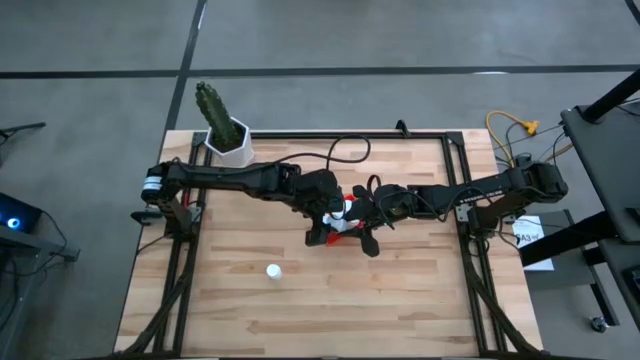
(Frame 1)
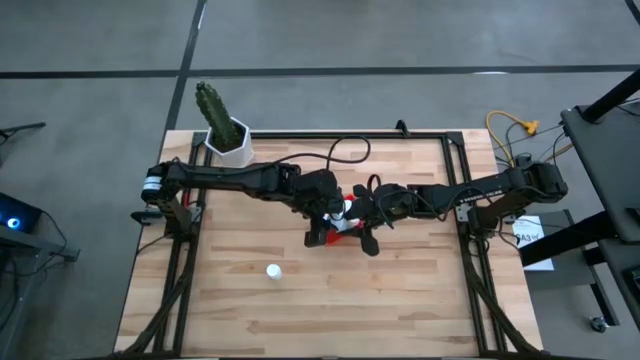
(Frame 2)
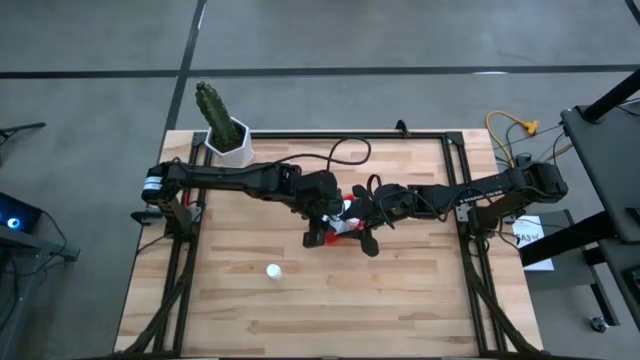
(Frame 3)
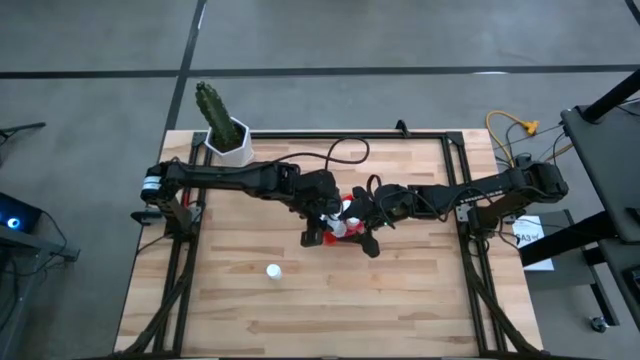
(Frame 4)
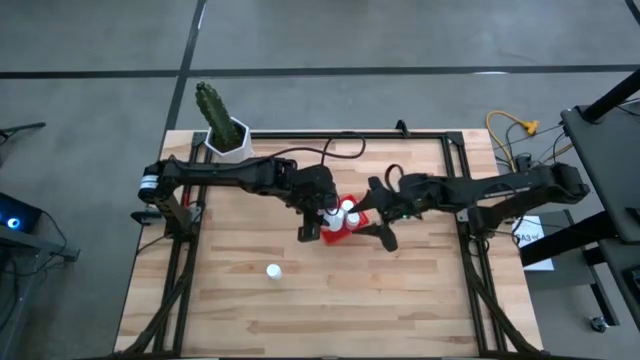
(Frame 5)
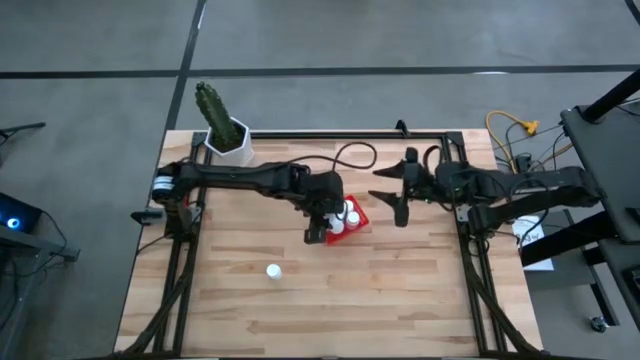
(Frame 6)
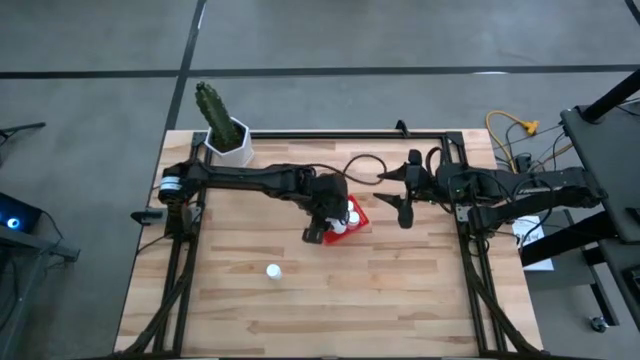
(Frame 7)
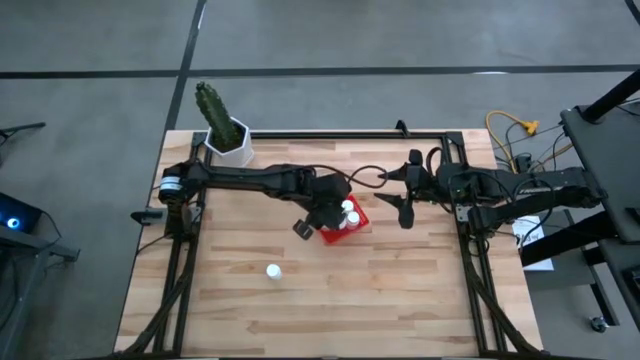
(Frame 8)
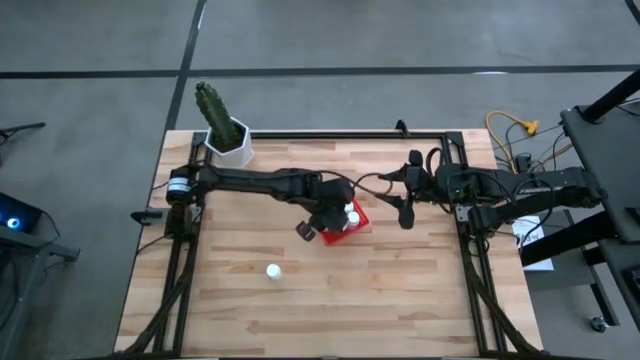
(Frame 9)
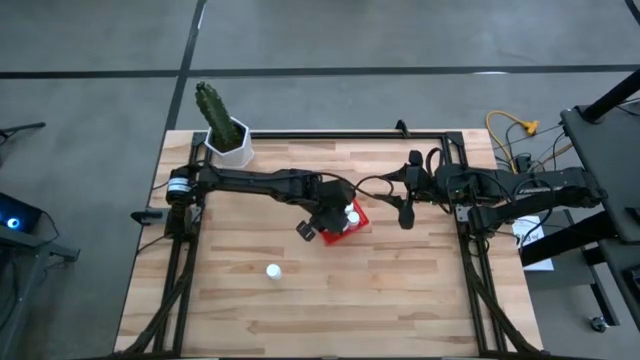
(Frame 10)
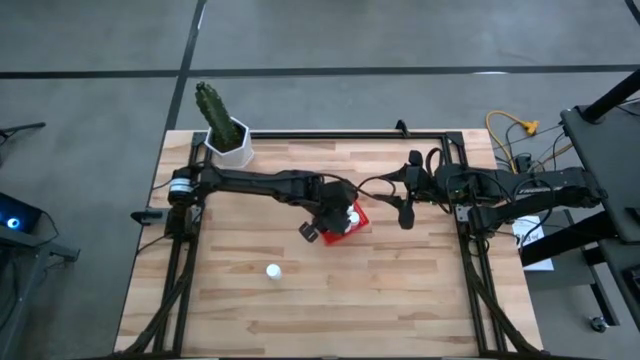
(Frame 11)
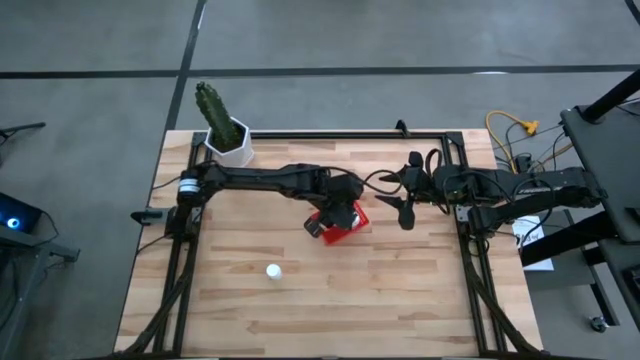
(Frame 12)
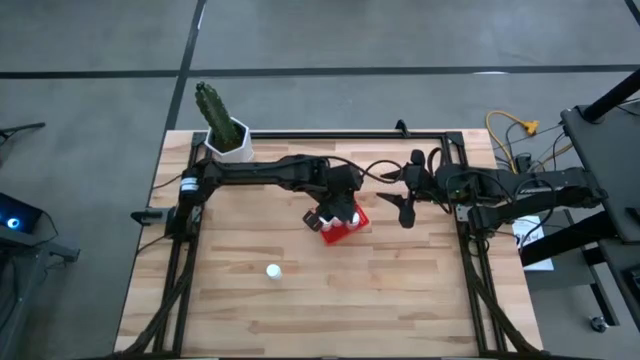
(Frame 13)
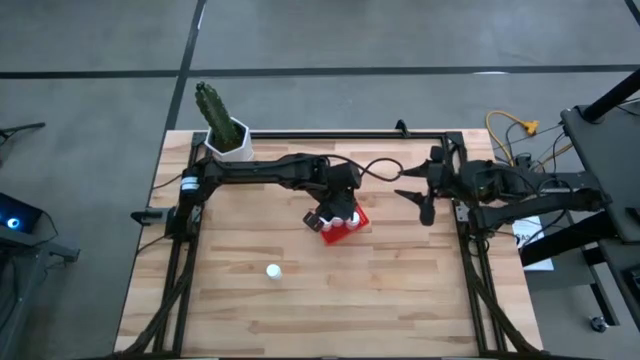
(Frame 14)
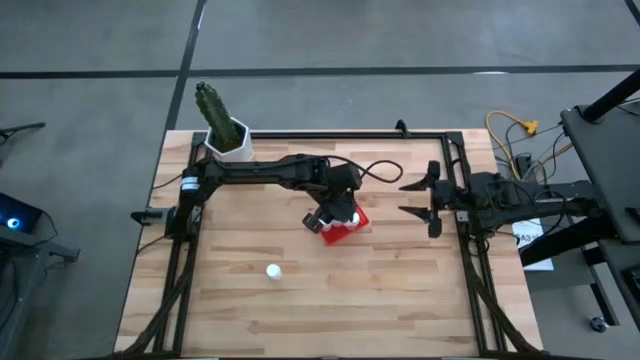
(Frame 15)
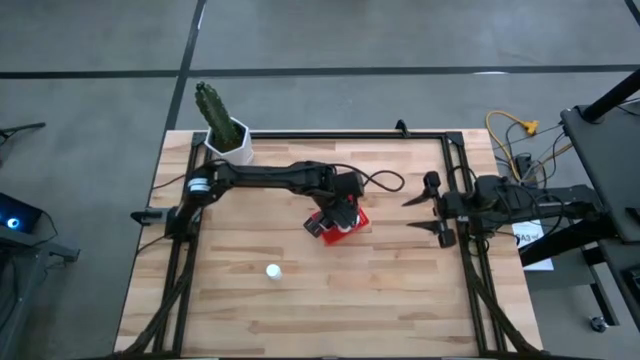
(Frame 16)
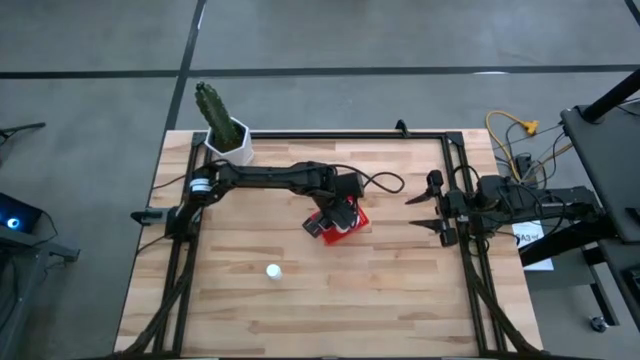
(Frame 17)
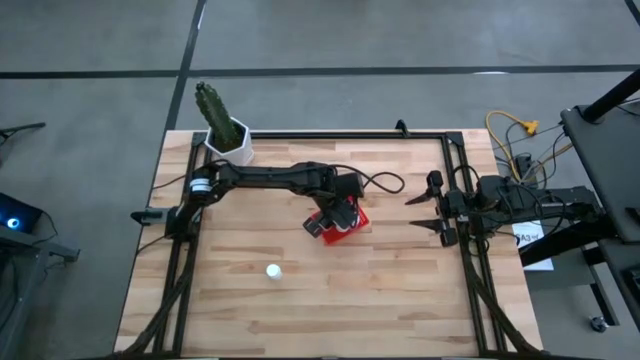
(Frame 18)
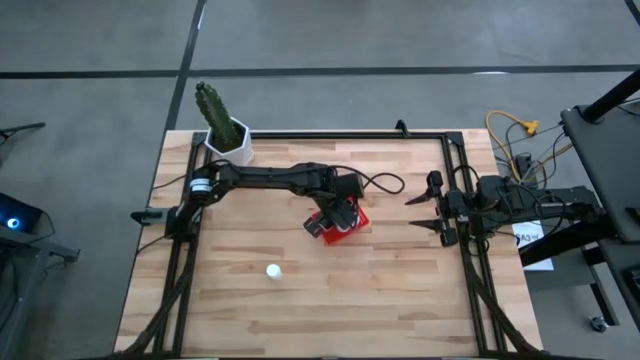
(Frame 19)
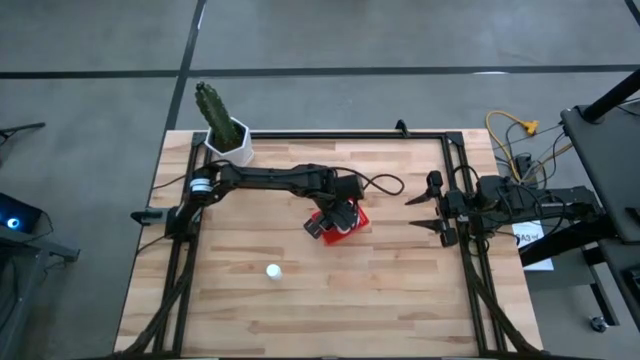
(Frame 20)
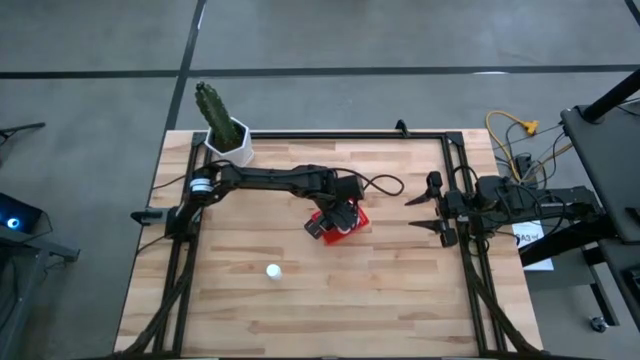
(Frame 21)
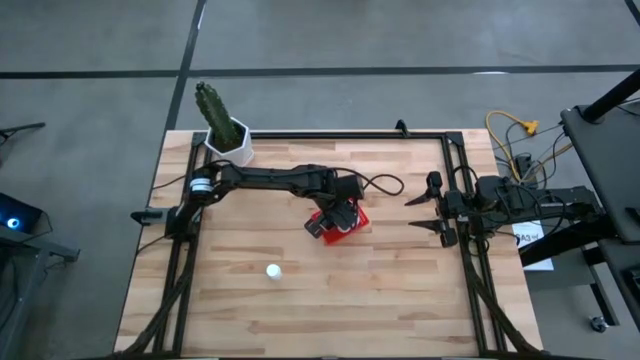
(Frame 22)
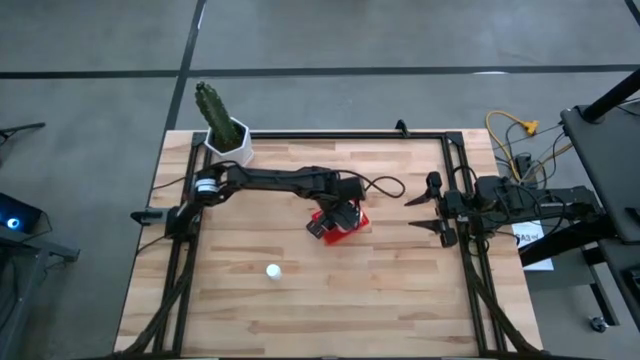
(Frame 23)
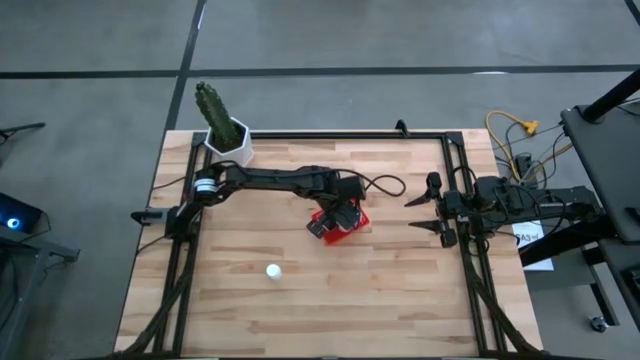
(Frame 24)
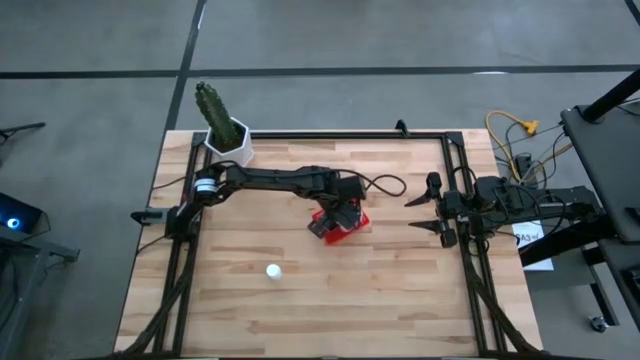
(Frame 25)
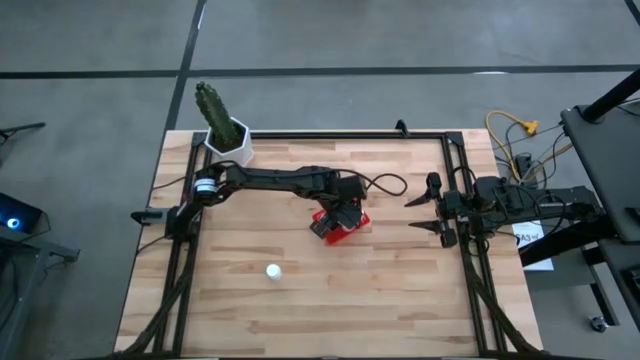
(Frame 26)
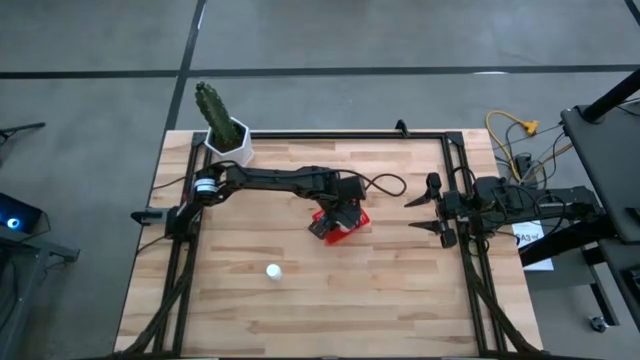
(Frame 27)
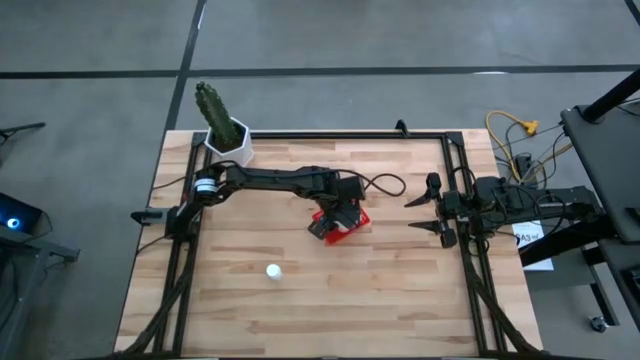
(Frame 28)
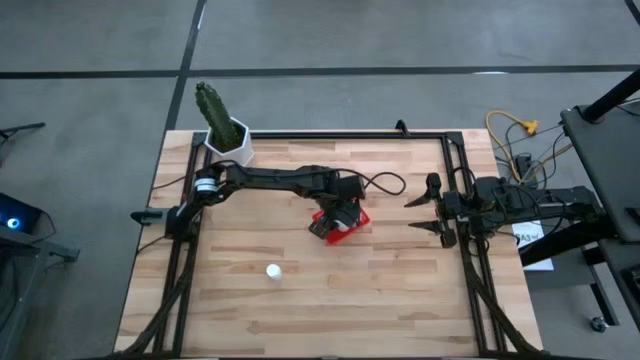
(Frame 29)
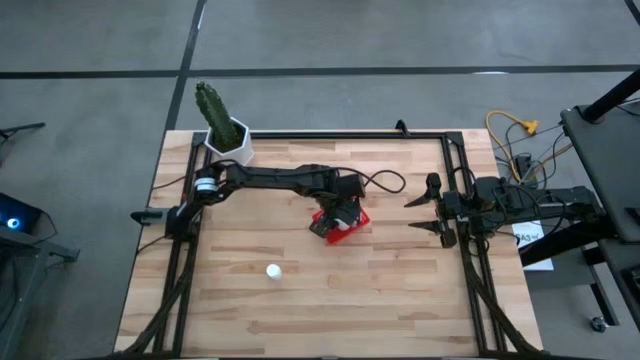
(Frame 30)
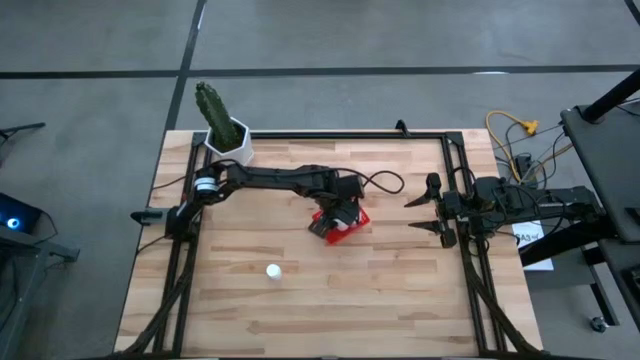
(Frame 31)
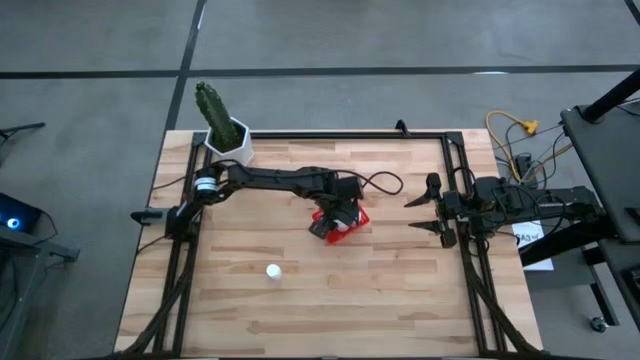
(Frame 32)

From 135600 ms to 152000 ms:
Task: Pick and place pill bottles into a basket
Put the white pill bottle into the red bin
